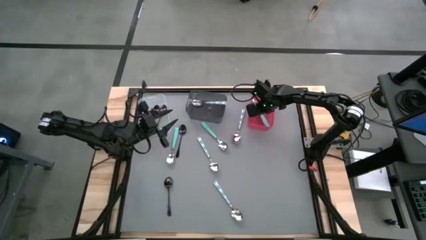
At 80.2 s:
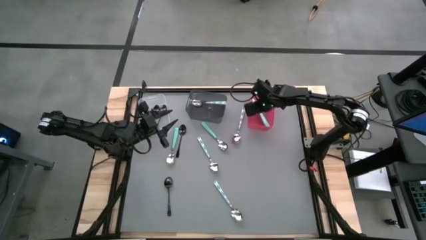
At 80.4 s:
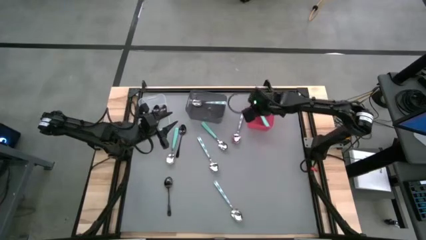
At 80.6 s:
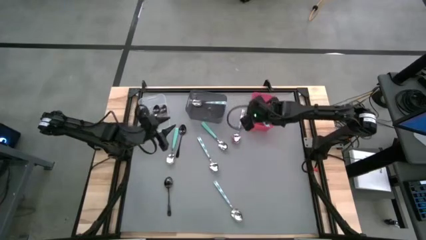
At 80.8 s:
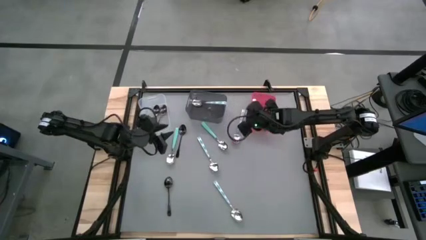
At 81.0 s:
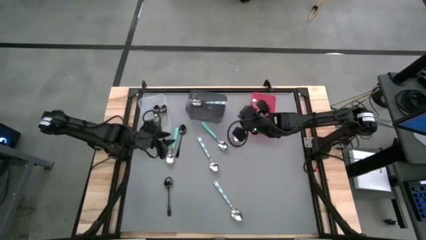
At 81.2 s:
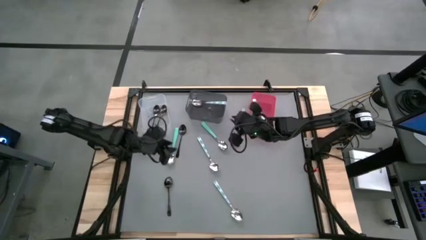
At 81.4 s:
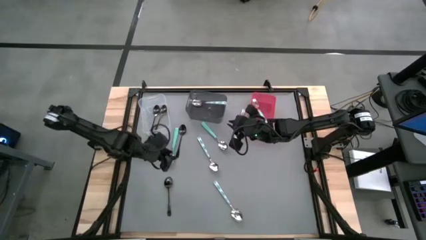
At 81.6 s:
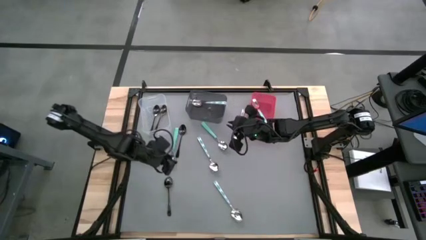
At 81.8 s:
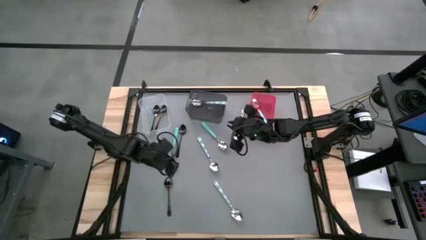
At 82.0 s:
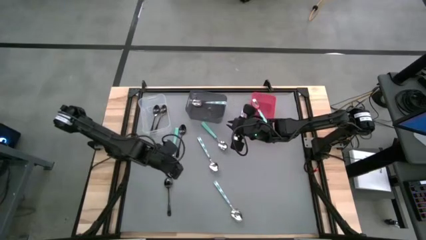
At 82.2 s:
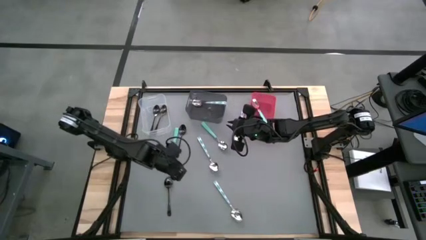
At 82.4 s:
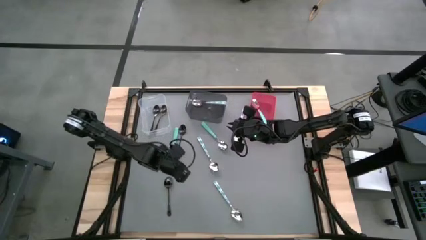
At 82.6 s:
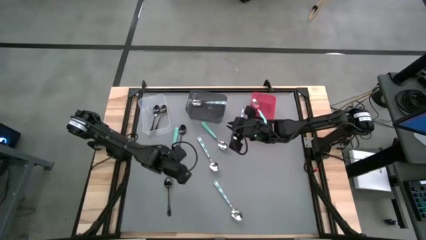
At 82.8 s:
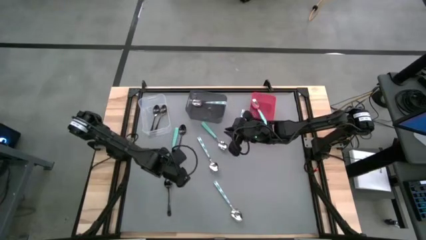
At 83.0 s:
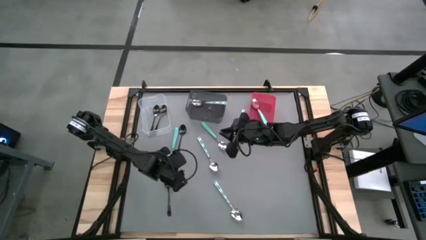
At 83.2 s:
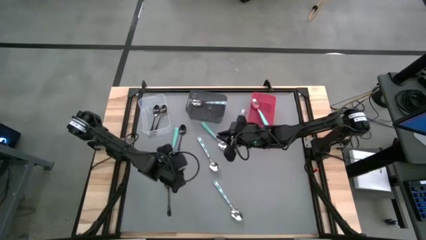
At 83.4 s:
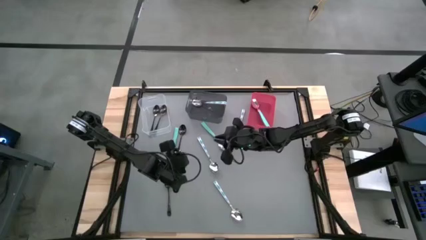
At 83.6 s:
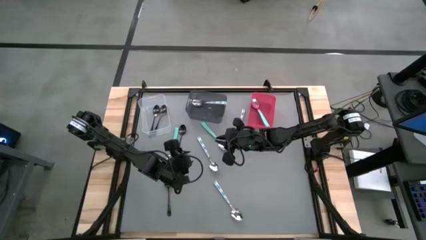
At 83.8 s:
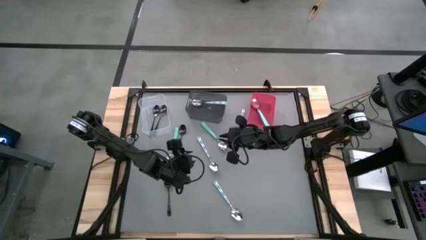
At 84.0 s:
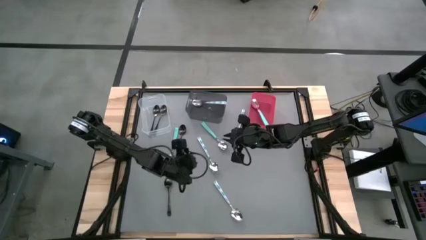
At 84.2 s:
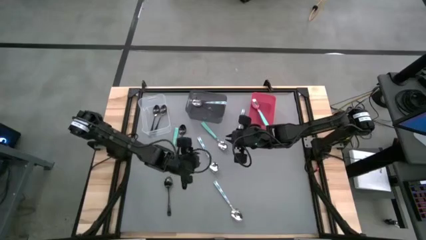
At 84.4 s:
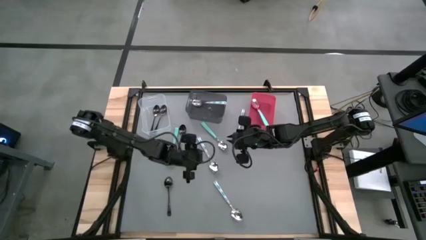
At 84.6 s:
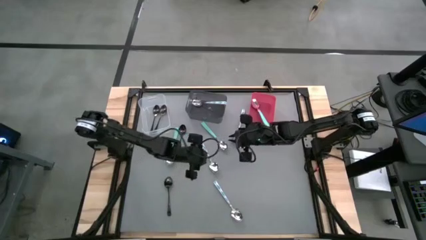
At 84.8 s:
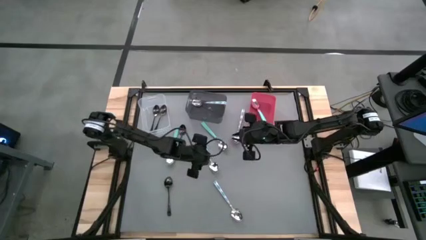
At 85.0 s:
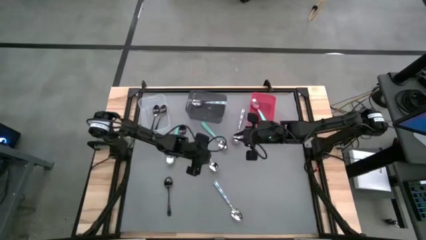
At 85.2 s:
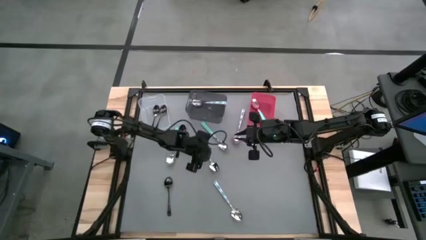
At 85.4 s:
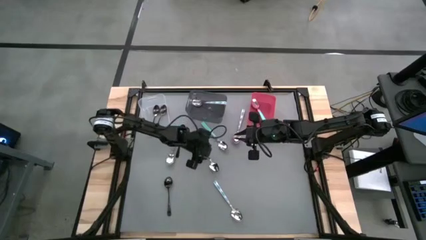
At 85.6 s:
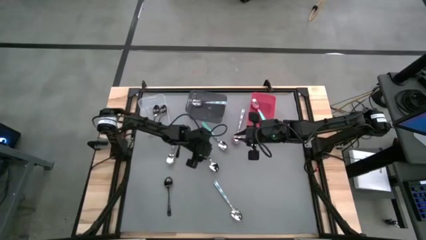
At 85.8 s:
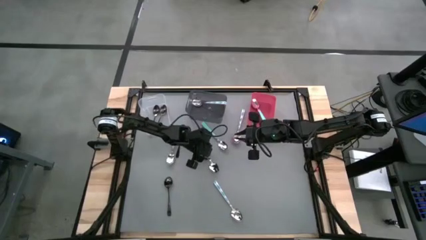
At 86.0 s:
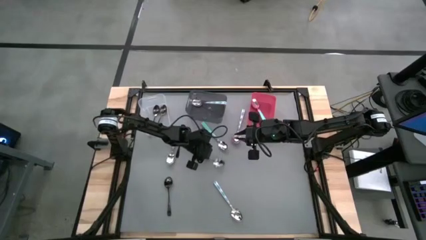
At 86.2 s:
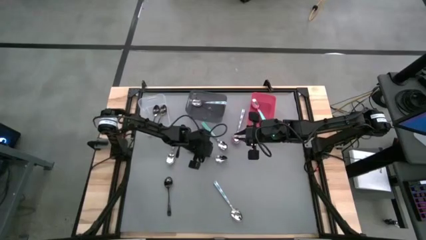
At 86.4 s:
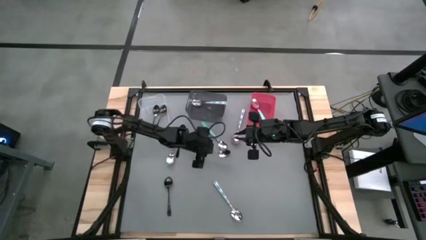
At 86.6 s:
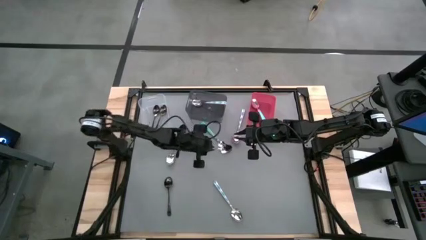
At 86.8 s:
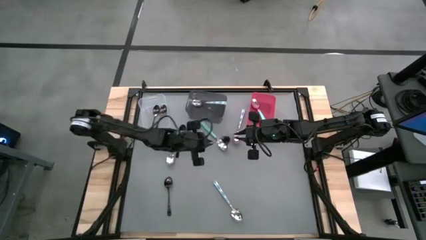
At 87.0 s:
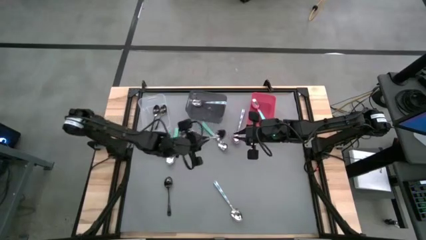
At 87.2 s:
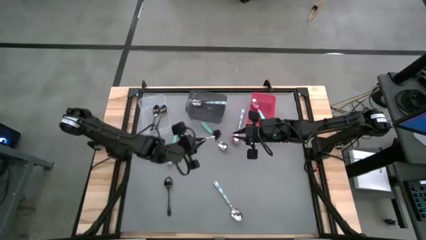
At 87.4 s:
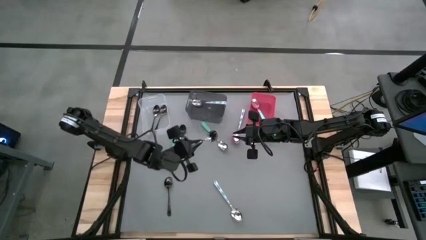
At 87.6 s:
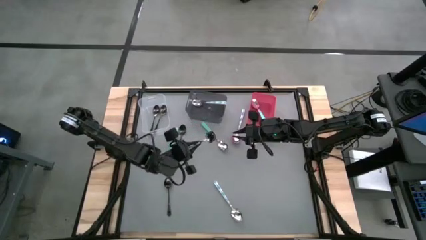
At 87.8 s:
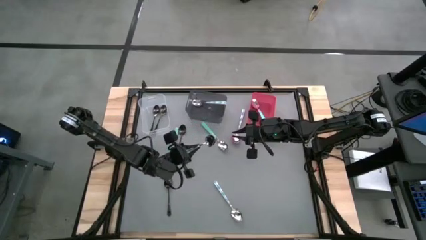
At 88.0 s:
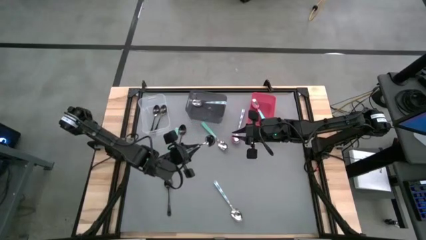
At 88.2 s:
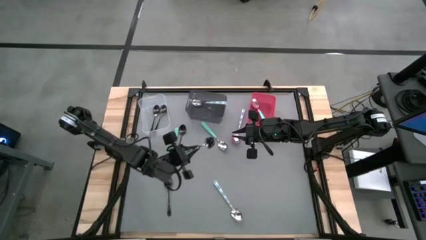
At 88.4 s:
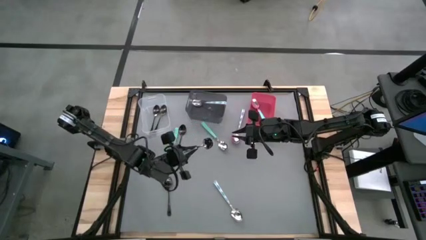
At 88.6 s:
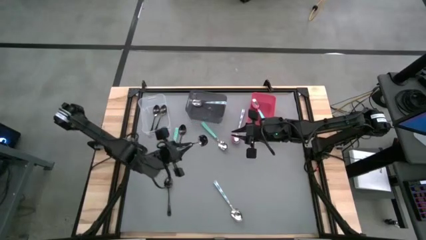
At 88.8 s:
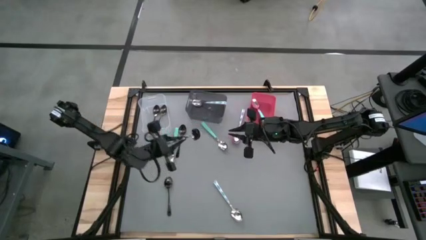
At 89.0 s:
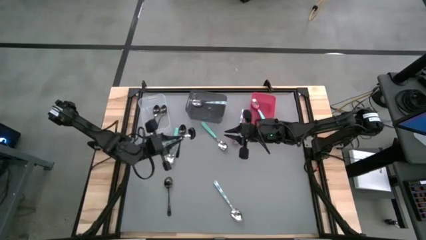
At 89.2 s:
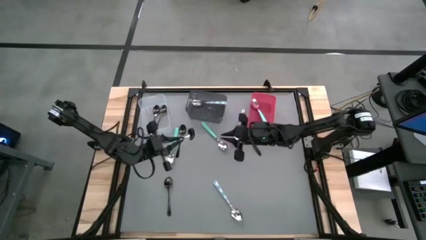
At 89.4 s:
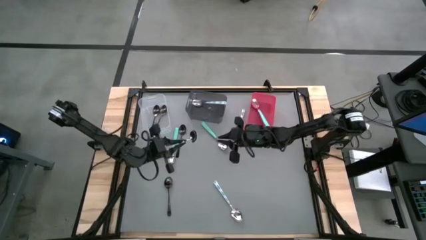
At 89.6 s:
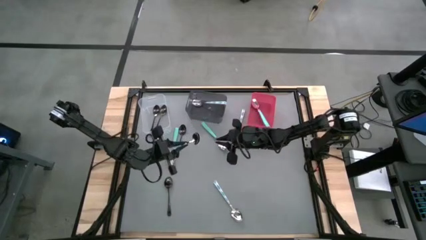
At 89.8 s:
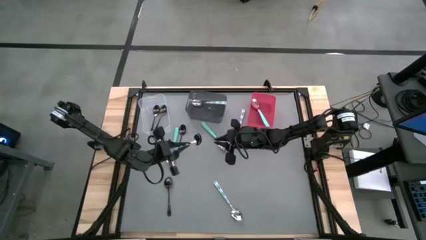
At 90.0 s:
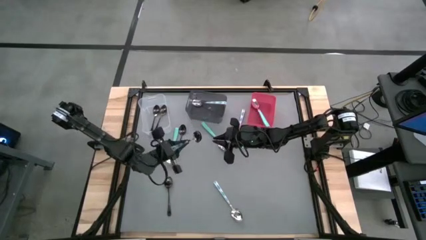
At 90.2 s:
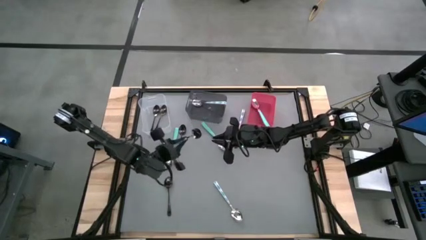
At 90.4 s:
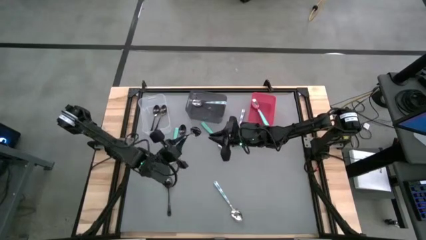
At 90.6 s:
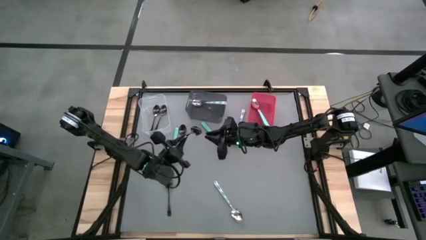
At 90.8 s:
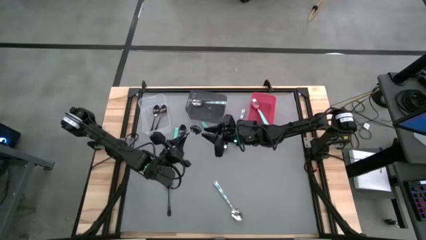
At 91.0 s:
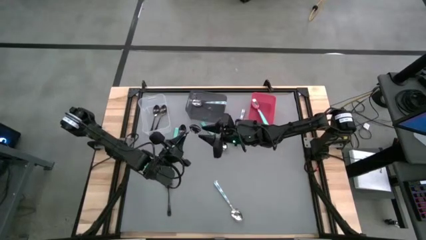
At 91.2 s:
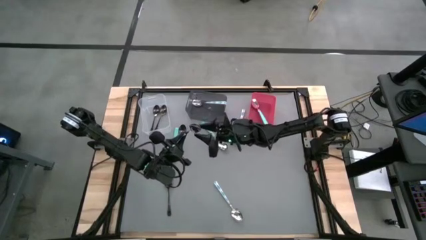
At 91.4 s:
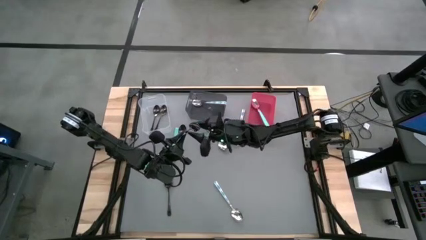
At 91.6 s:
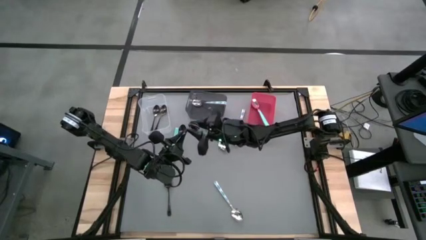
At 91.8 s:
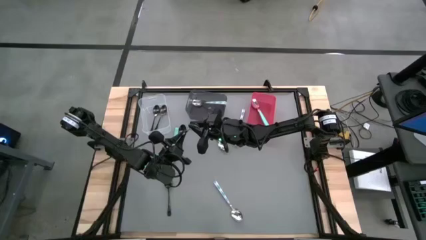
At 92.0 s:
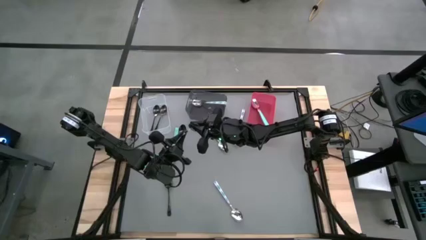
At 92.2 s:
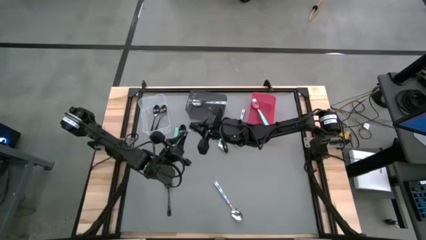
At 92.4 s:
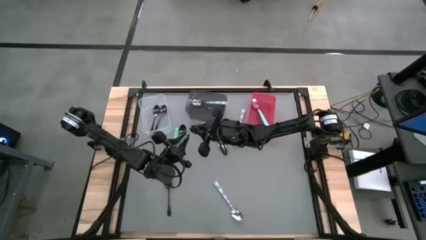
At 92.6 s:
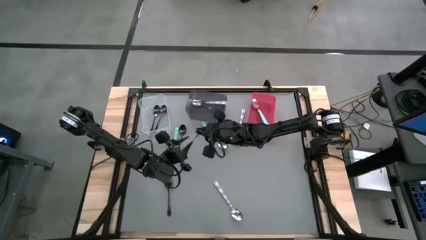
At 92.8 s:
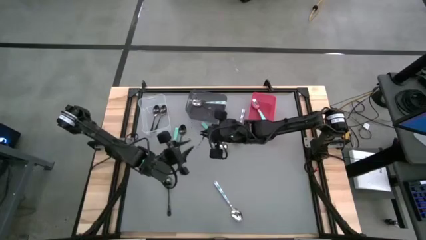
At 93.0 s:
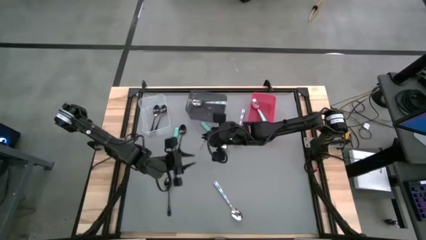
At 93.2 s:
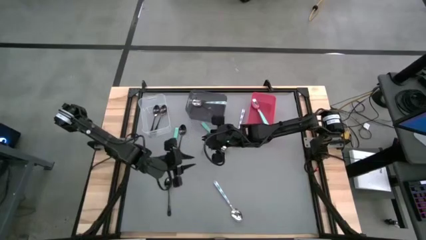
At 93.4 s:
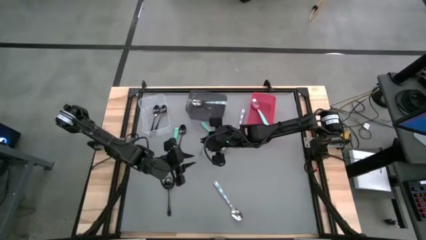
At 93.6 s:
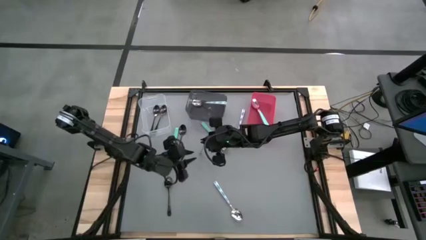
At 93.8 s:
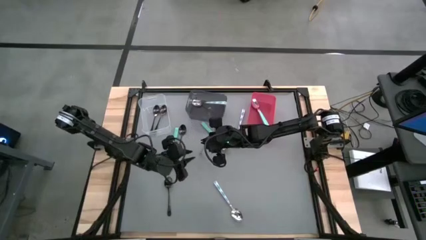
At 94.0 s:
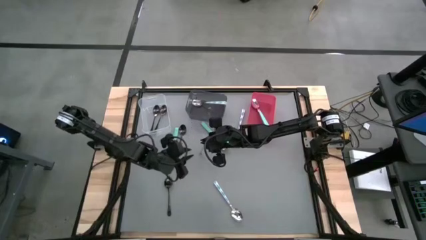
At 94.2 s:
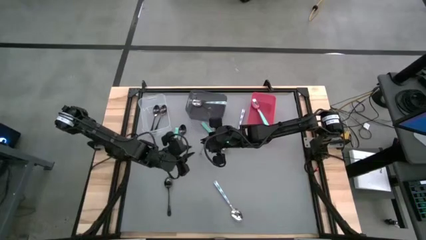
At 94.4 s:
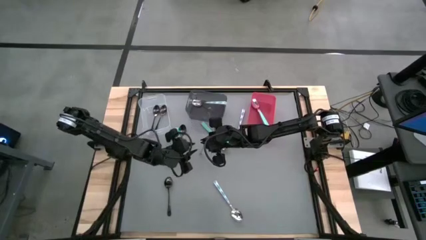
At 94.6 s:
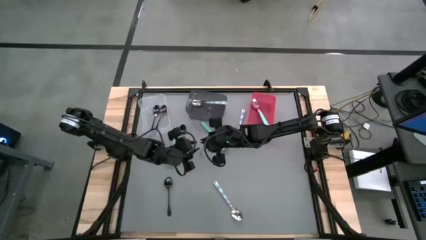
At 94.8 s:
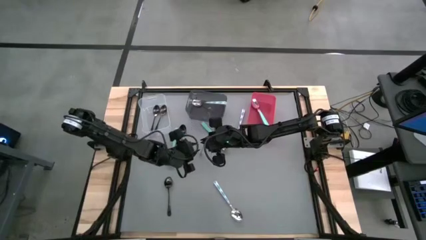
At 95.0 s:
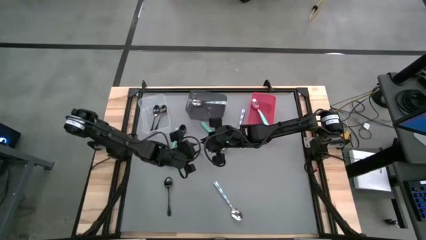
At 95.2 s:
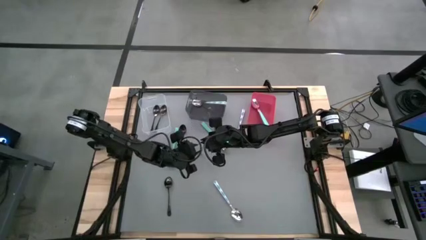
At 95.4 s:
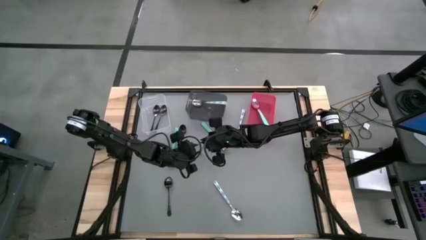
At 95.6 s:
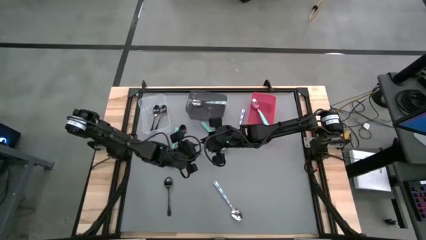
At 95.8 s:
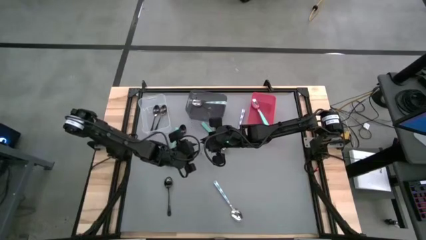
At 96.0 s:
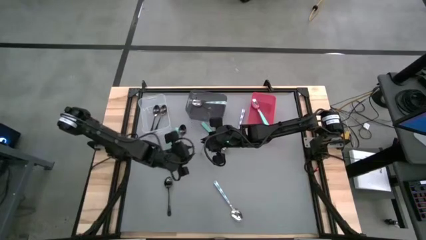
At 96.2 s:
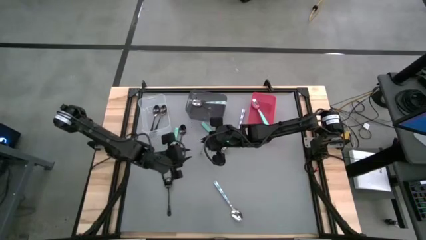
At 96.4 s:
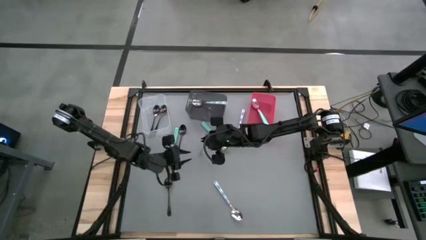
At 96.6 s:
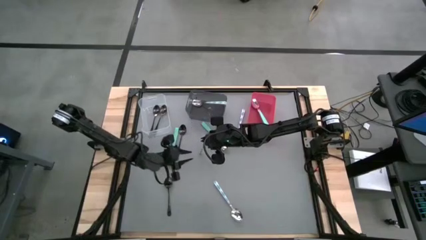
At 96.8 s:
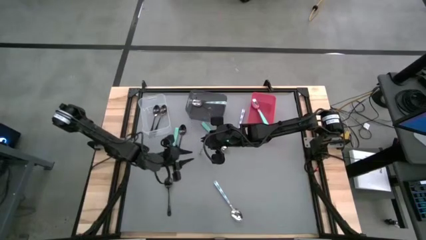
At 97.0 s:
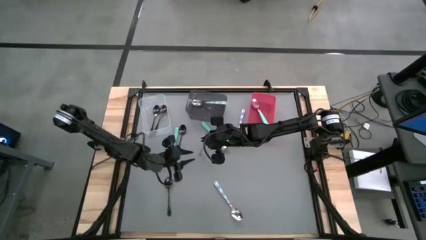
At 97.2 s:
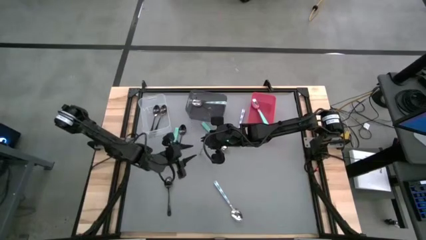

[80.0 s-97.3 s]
Task: Sort silverware by color (type)
Put the middle blue patterned spoon into the black bin
